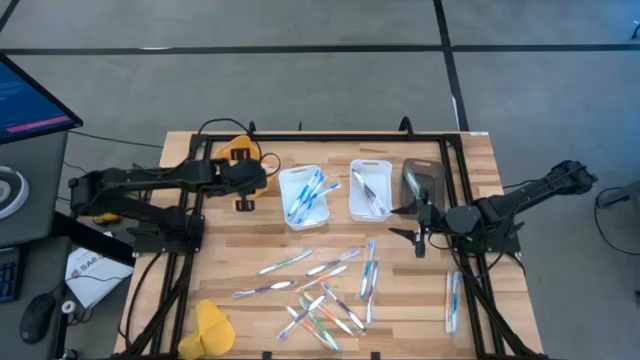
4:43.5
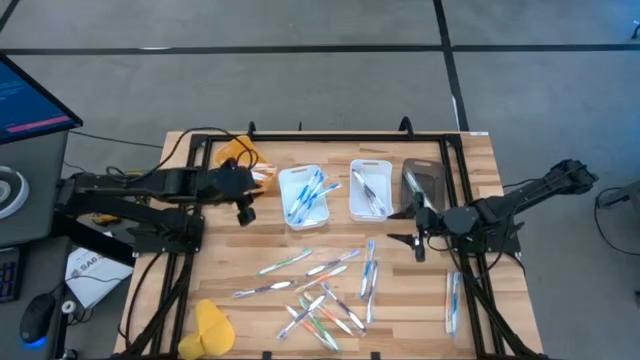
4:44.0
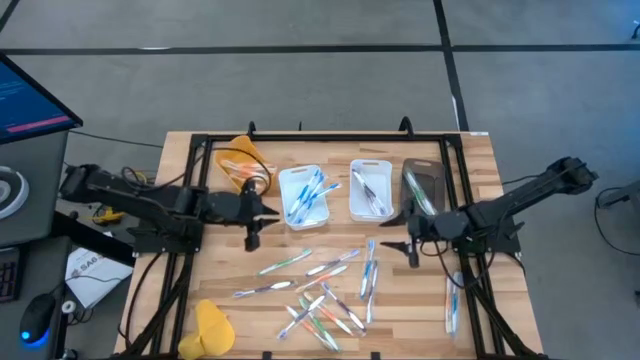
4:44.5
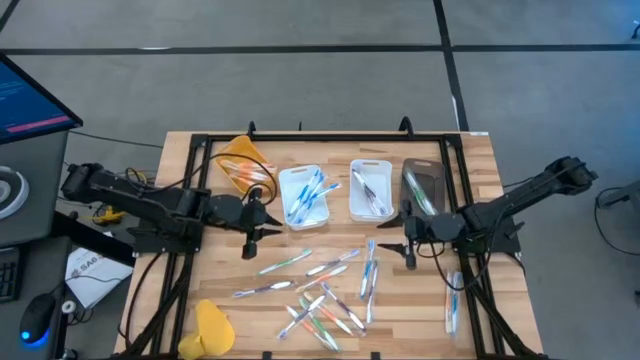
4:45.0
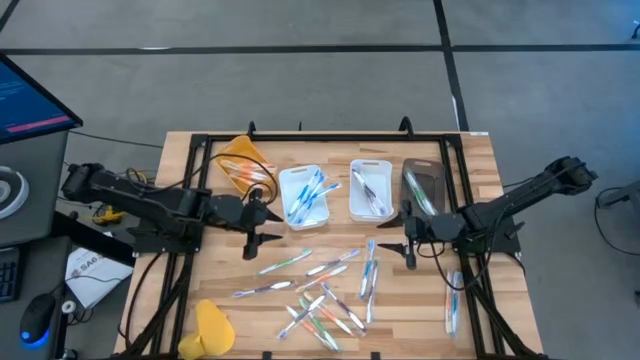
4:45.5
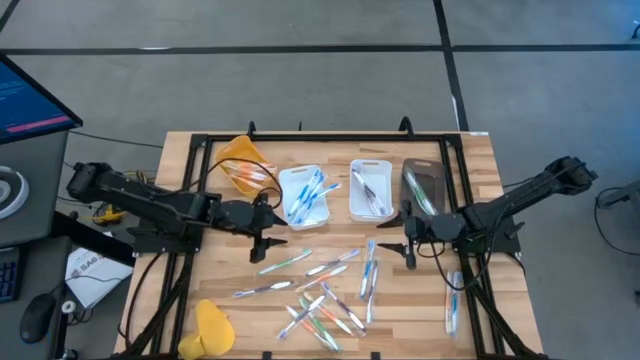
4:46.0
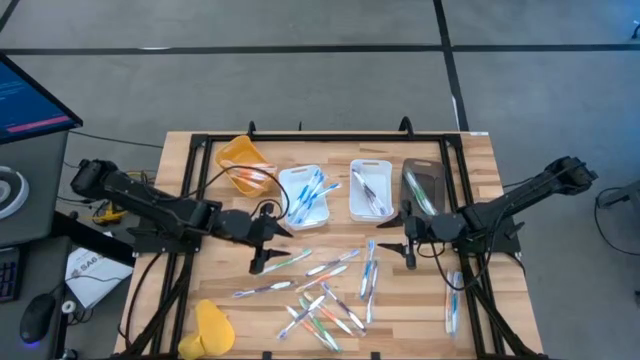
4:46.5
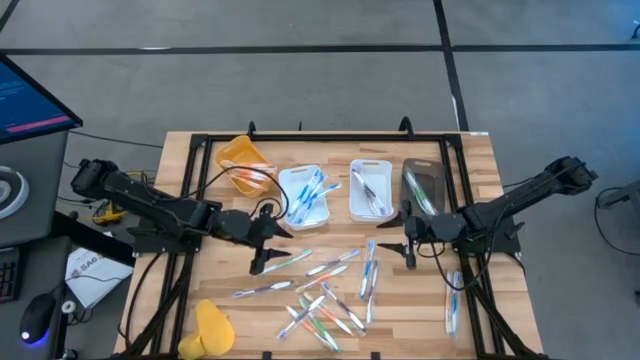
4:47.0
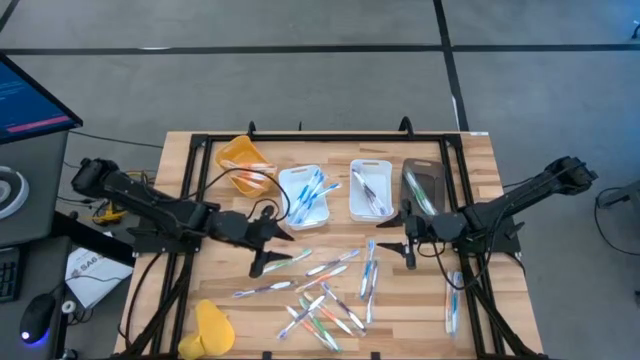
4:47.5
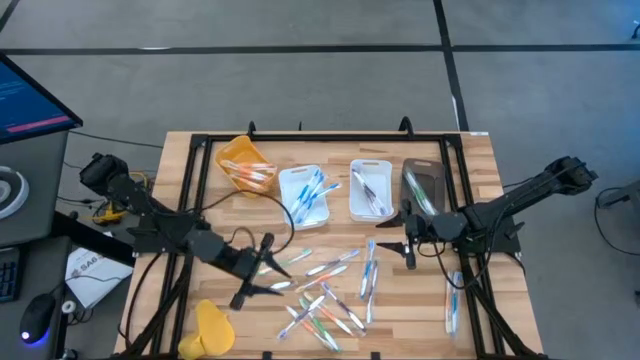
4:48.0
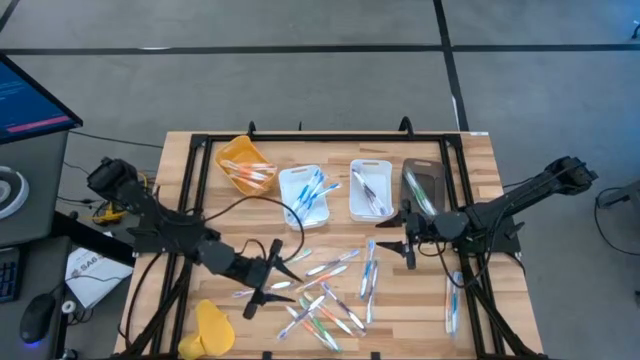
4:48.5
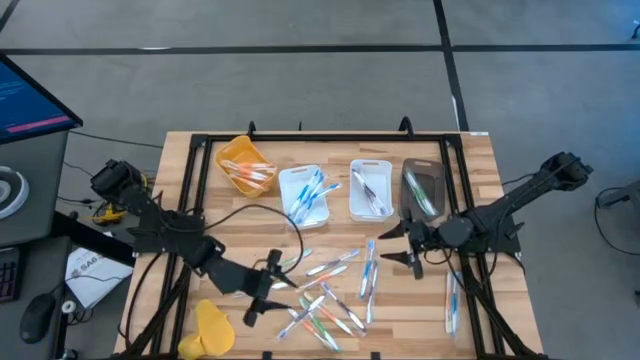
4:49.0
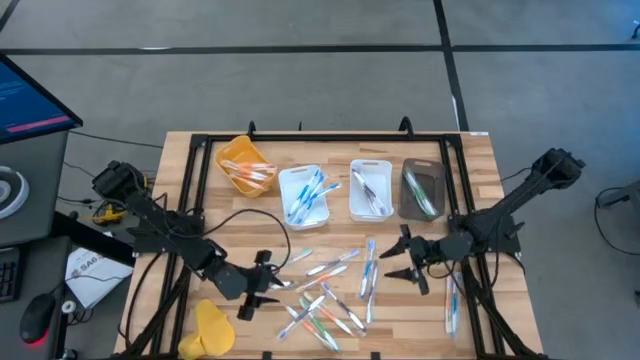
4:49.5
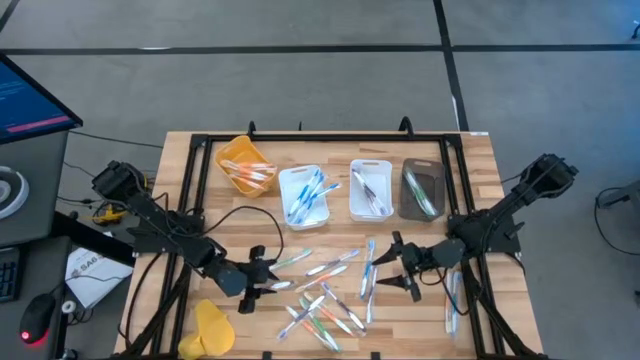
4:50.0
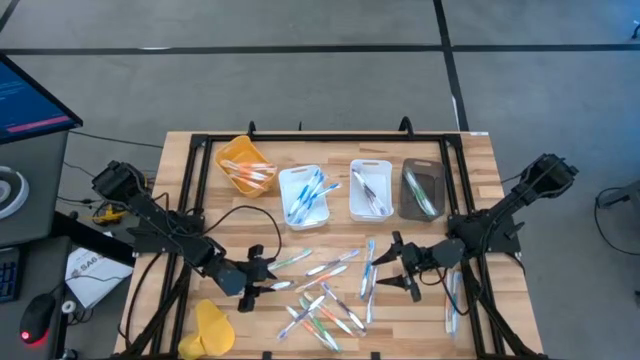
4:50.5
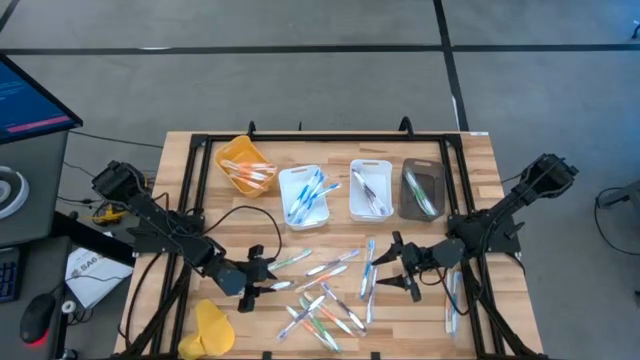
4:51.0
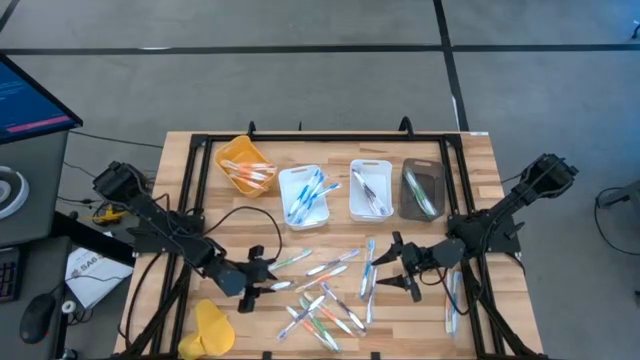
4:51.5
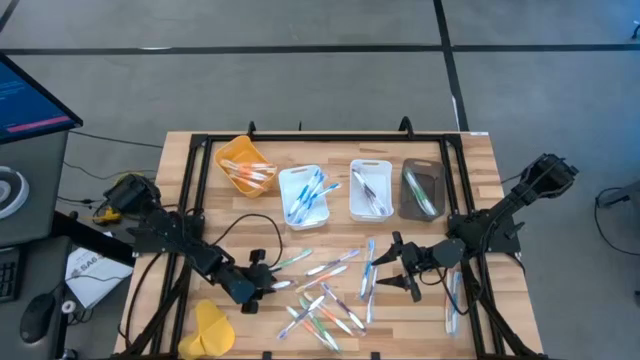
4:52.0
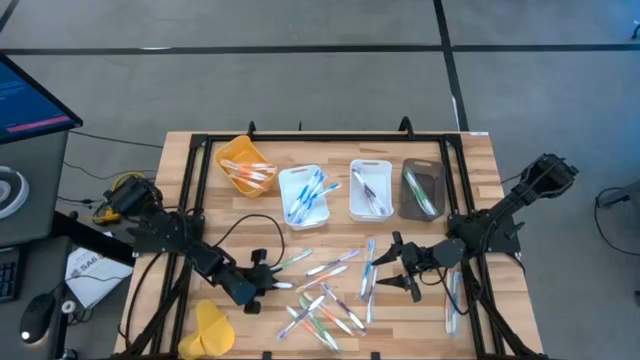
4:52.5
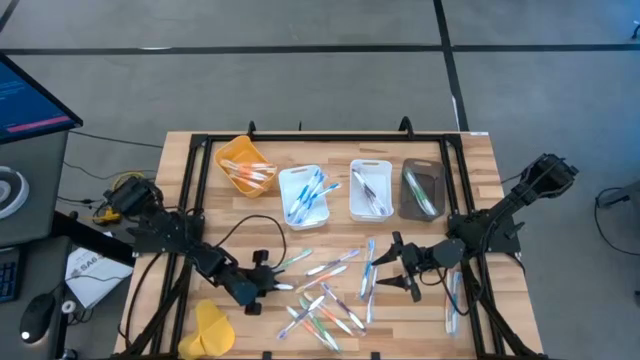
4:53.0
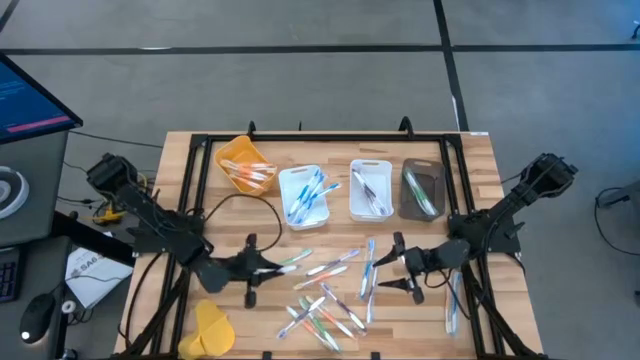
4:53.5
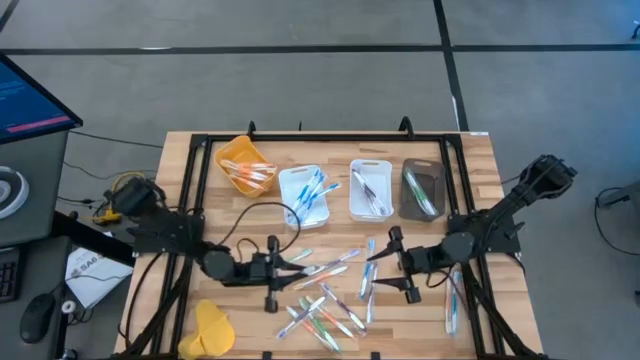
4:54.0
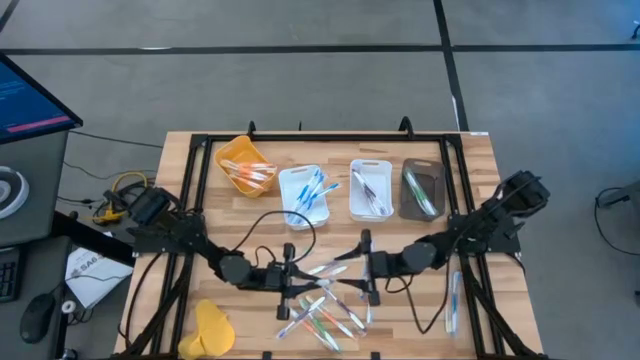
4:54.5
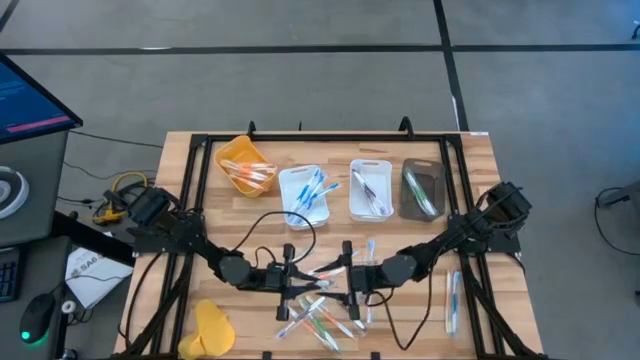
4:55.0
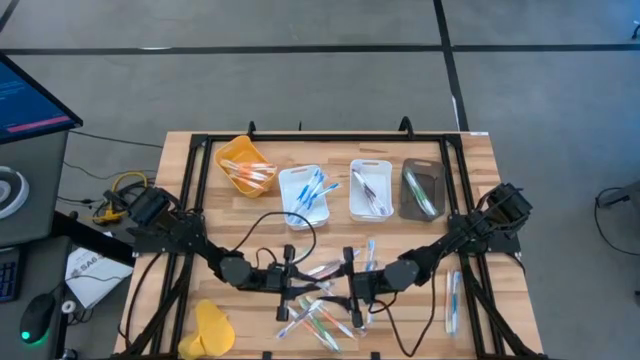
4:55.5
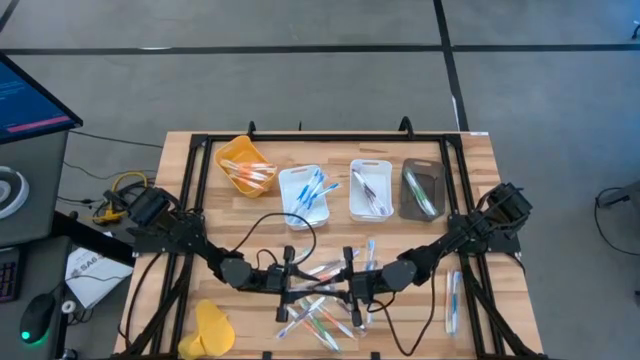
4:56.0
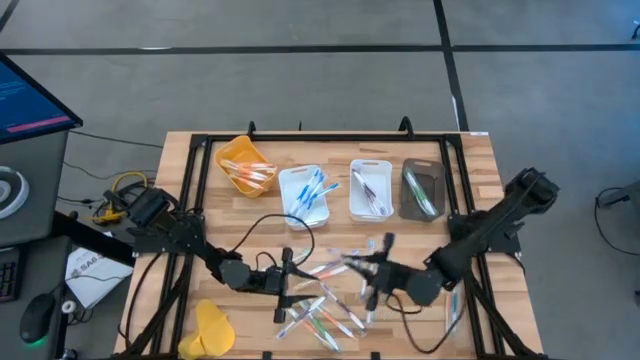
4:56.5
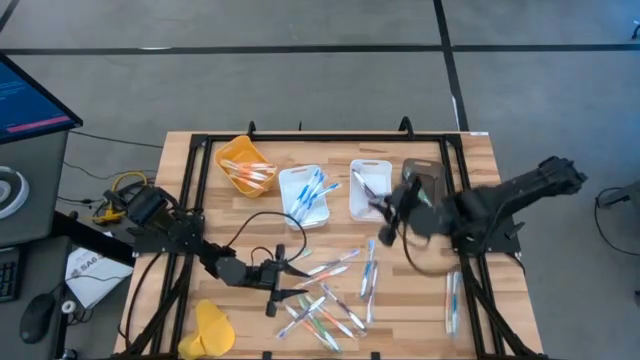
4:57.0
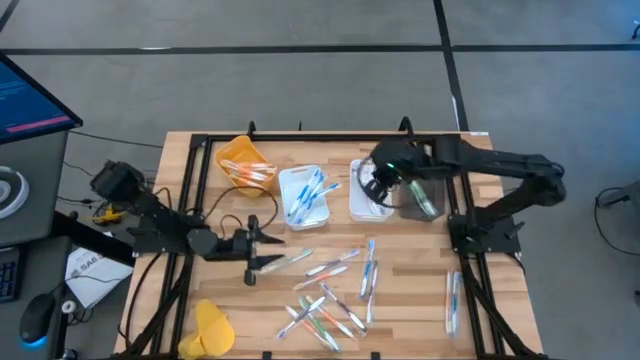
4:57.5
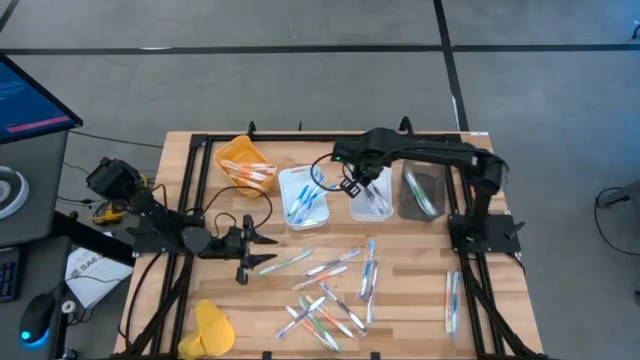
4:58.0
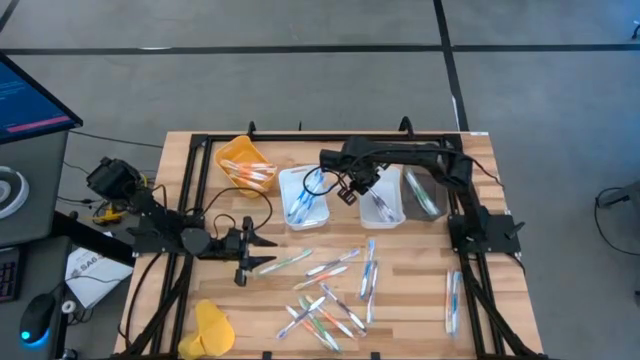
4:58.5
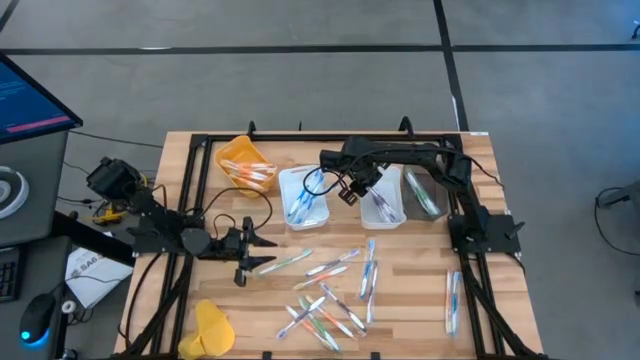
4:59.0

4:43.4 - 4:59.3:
Task: Pick & Place Toothbrushes
Put the purple toothbrush into the right white bin

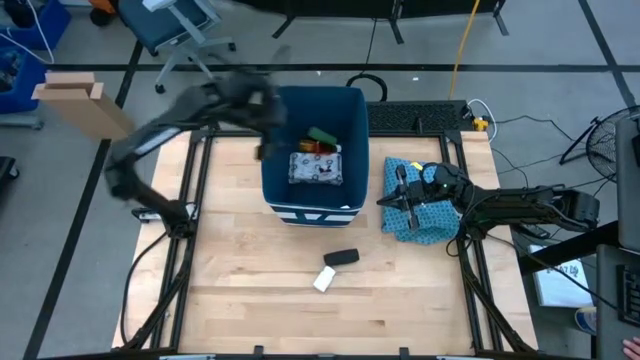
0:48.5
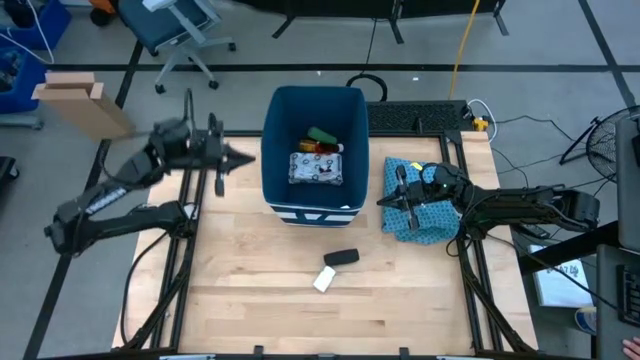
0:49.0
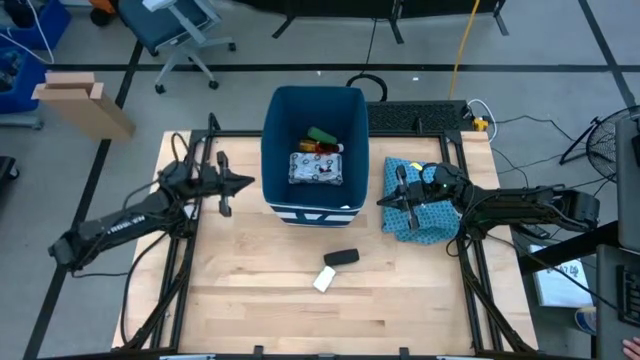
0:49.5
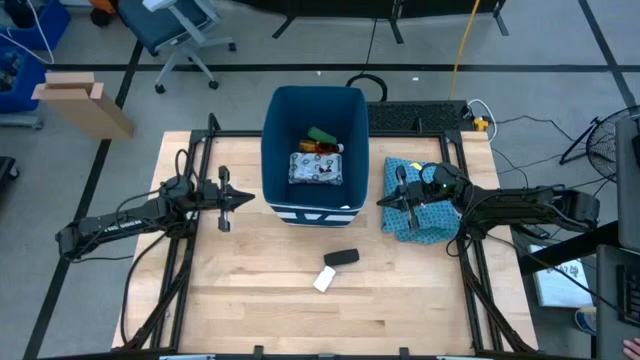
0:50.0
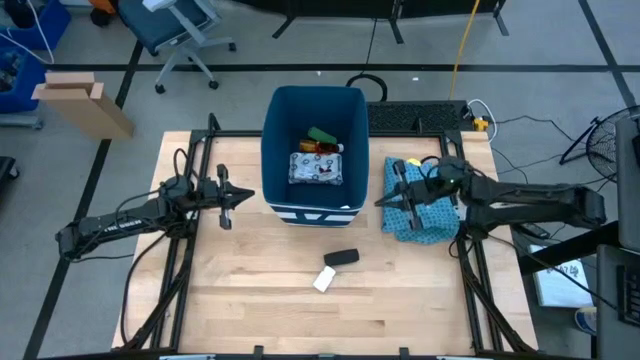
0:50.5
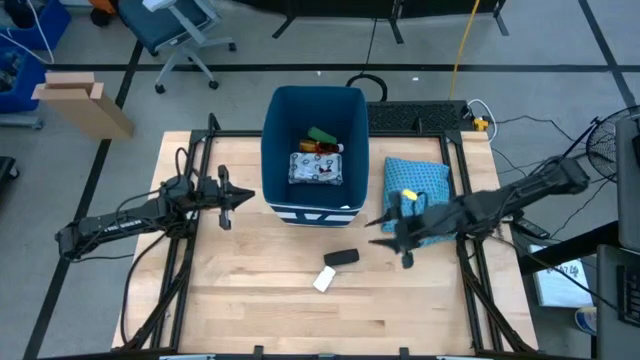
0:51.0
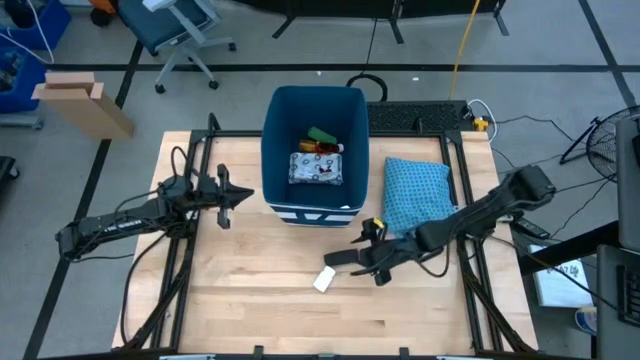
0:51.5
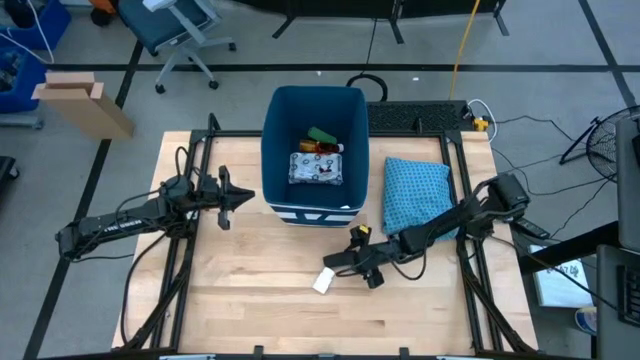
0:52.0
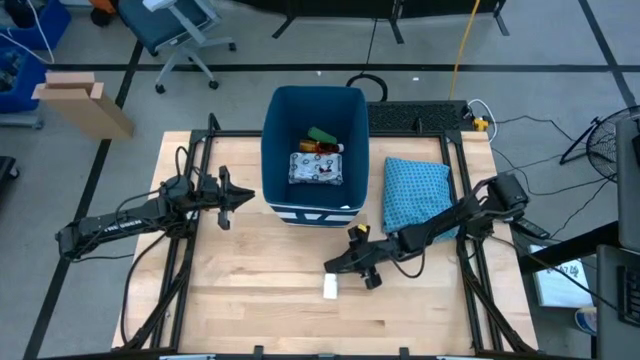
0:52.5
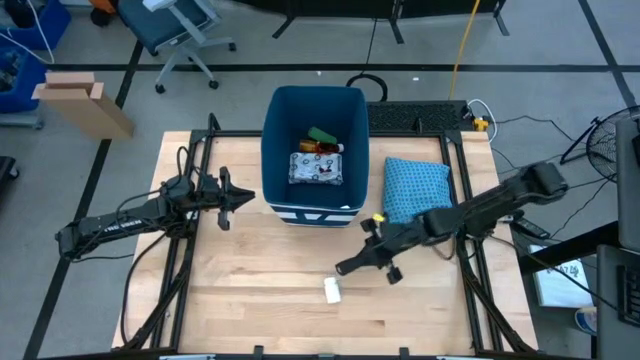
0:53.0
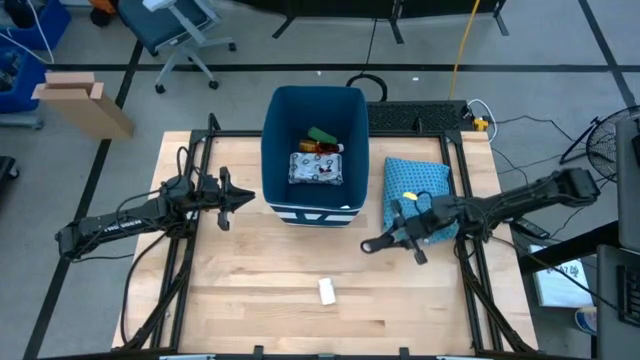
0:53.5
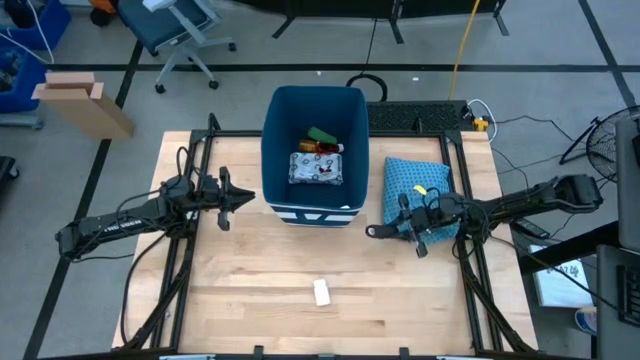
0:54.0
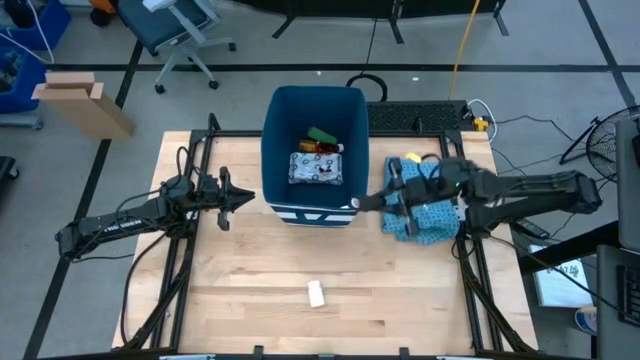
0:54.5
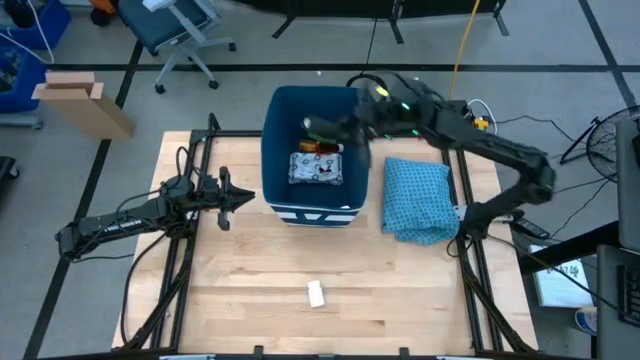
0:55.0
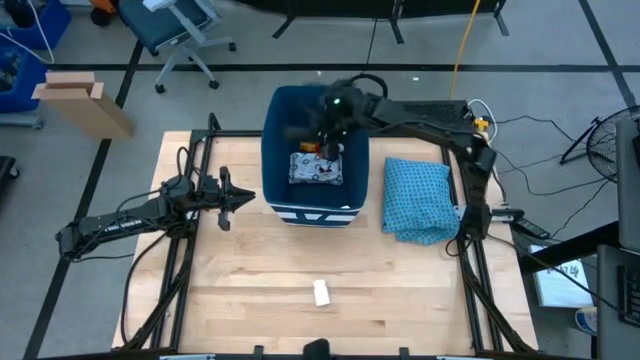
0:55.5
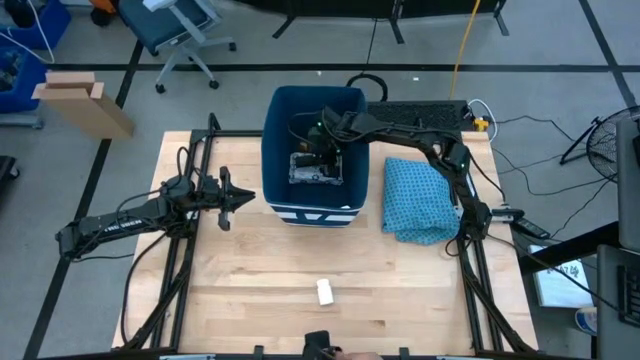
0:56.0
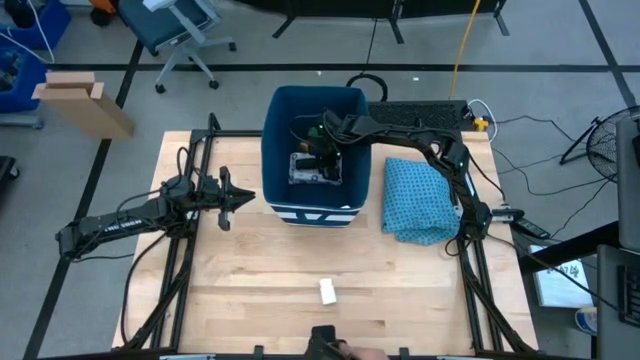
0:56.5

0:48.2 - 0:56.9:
Task: Pick & place medical supplies in basket/bin
Put the black rolled bandage into the blue bin
